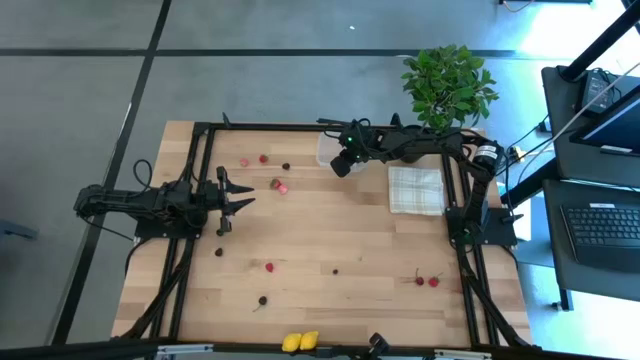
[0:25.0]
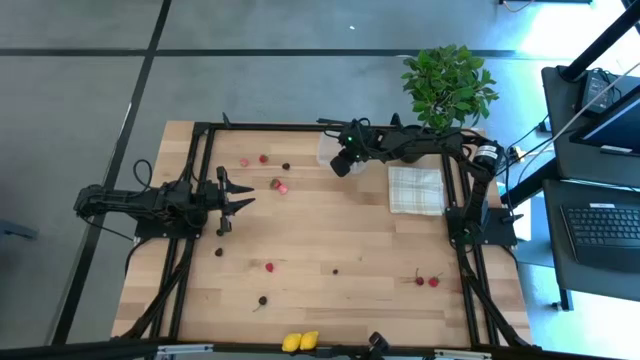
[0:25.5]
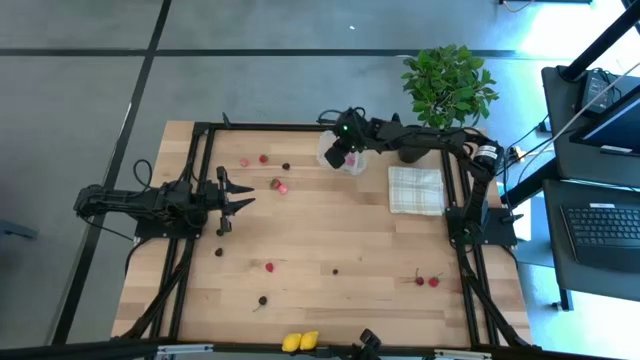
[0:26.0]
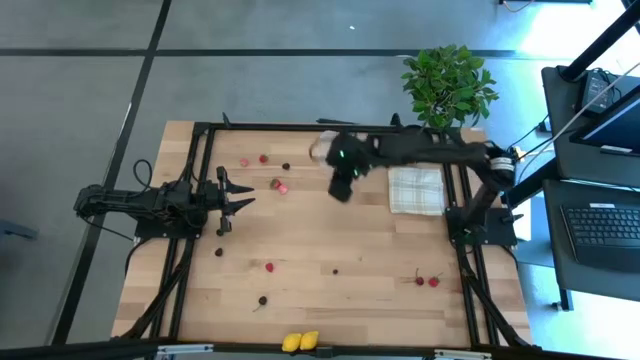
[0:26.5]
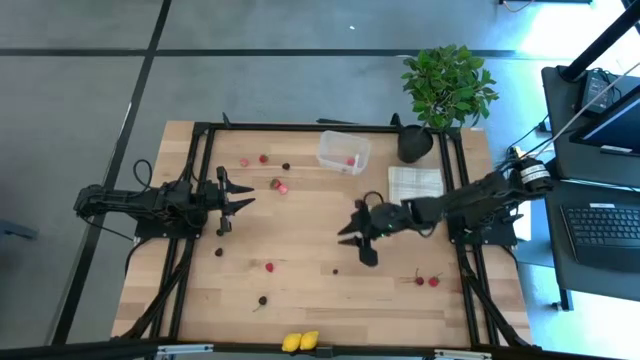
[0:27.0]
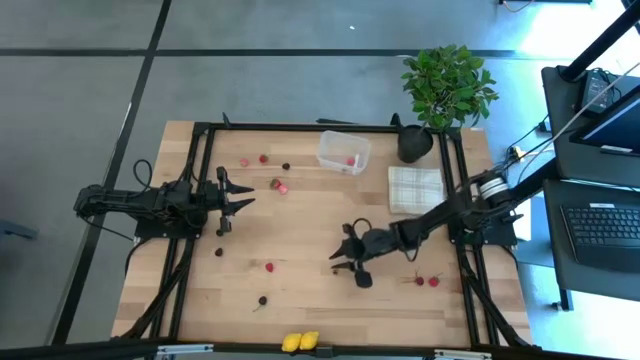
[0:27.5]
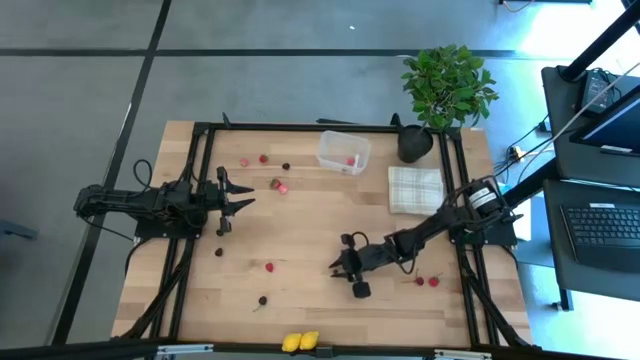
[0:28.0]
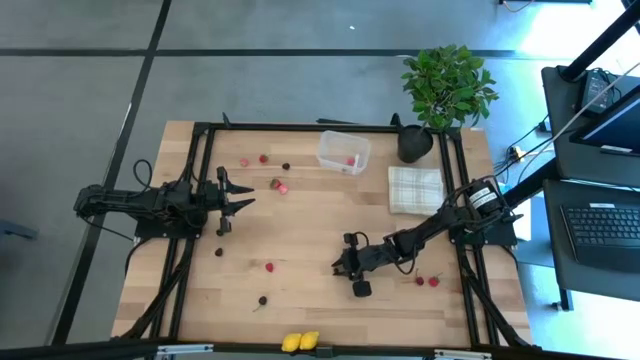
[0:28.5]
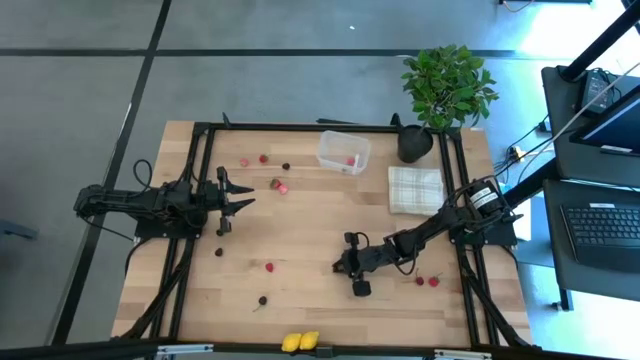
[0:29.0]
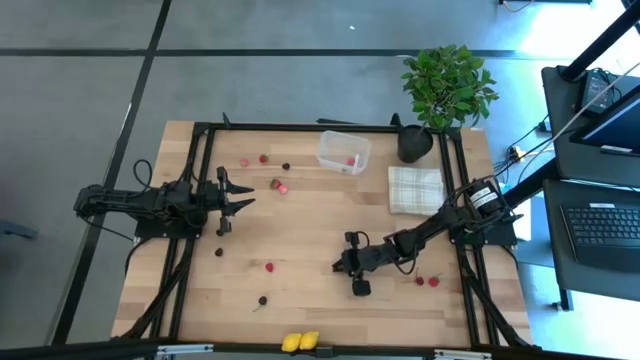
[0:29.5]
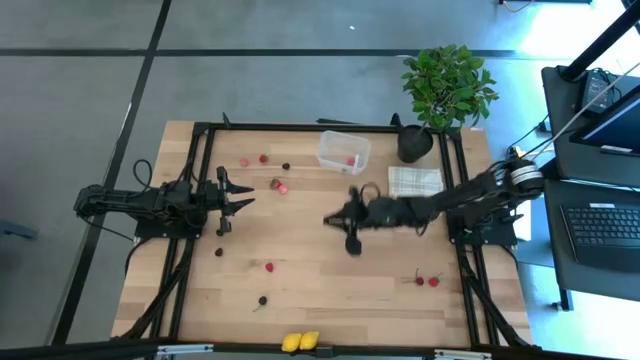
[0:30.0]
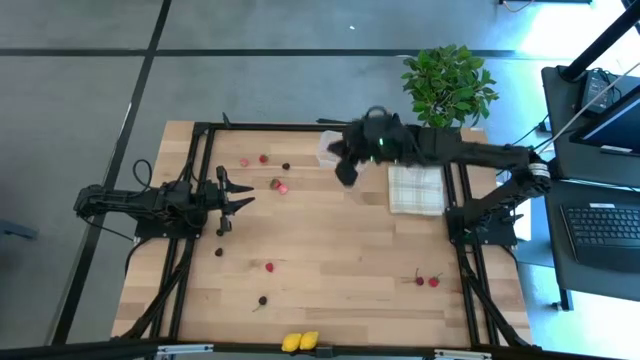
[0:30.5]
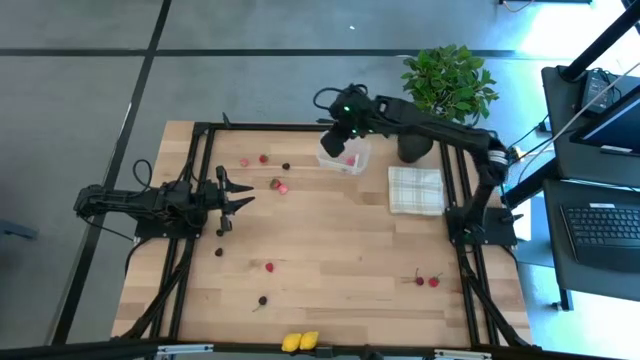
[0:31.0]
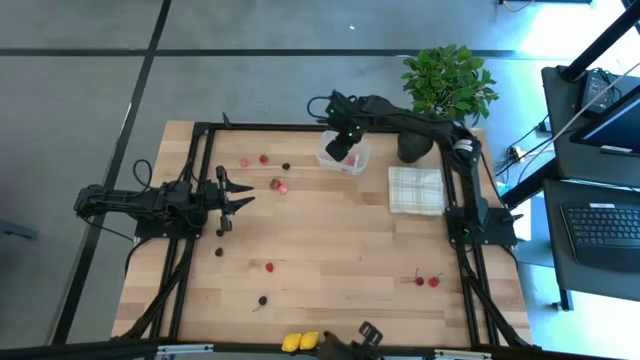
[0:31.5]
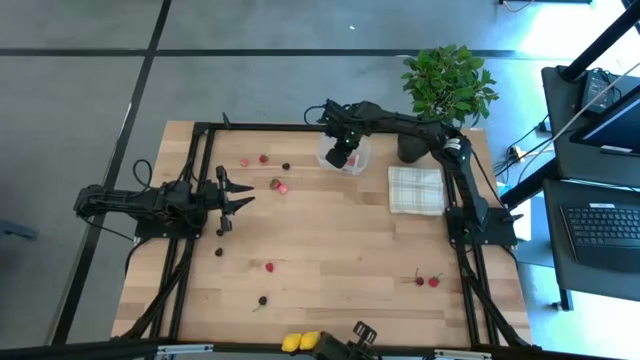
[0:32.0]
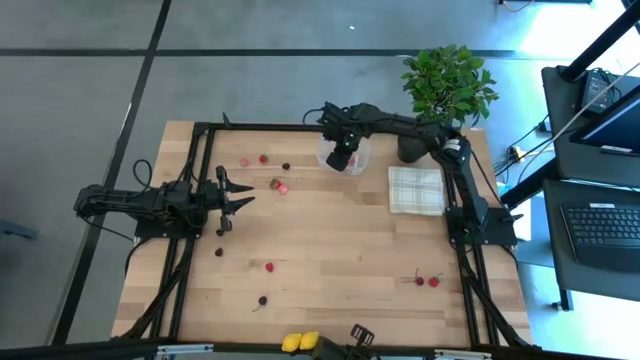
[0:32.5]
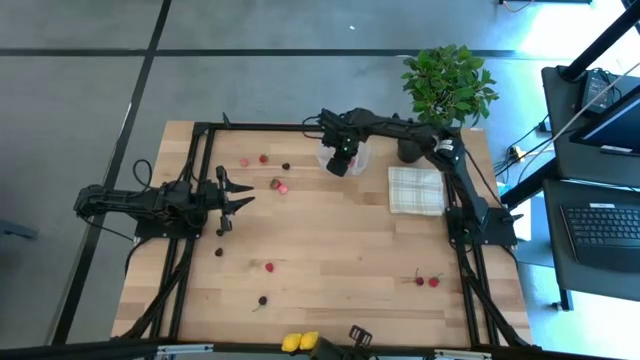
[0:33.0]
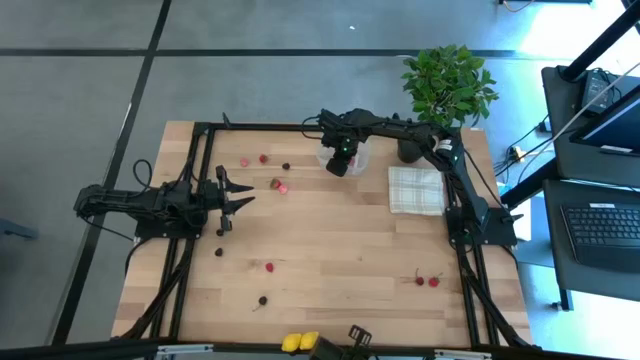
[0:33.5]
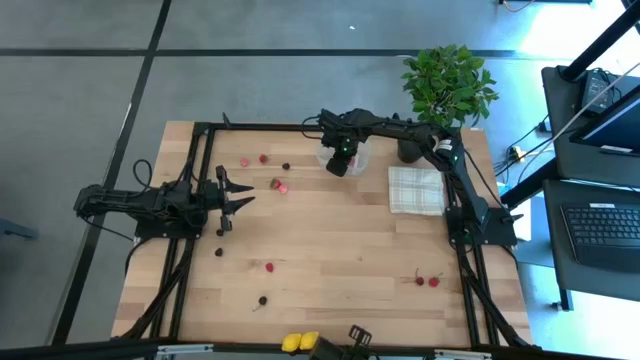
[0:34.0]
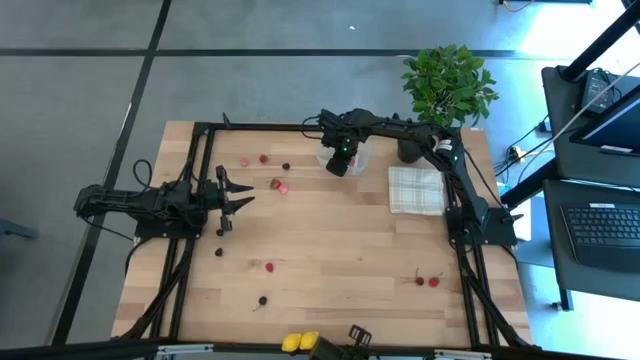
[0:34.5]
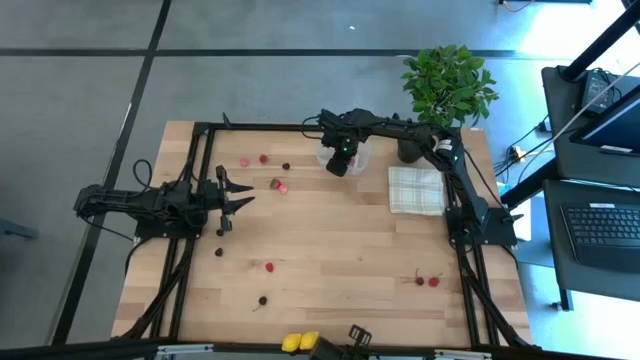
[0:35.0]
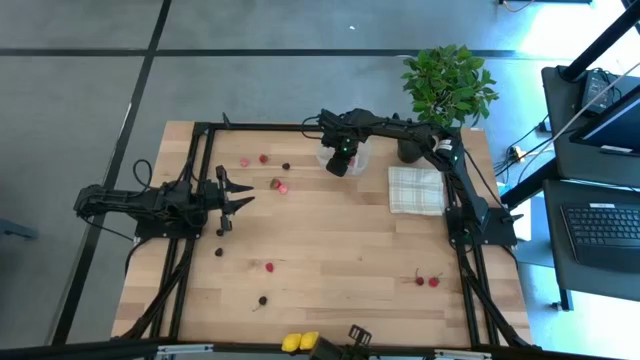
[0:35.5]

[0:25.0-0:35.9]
Task: Pick and placing Produce into tupperware
Put the blueberry into the transparent container

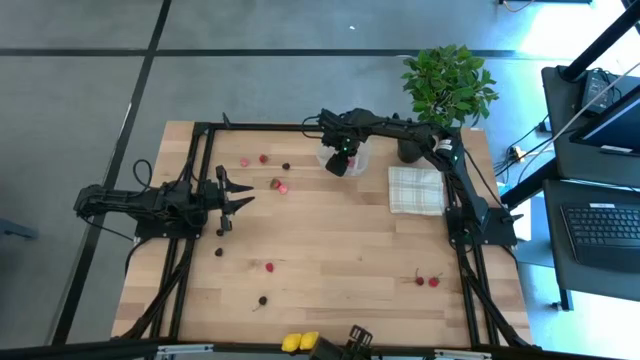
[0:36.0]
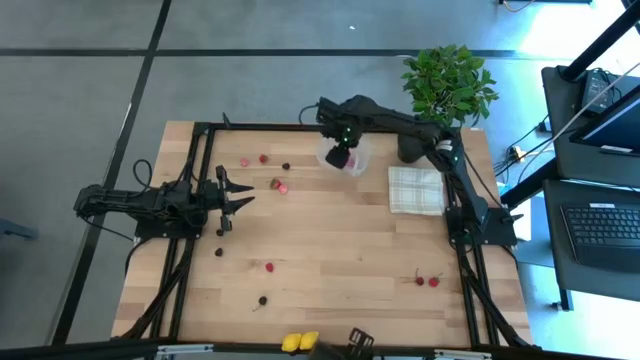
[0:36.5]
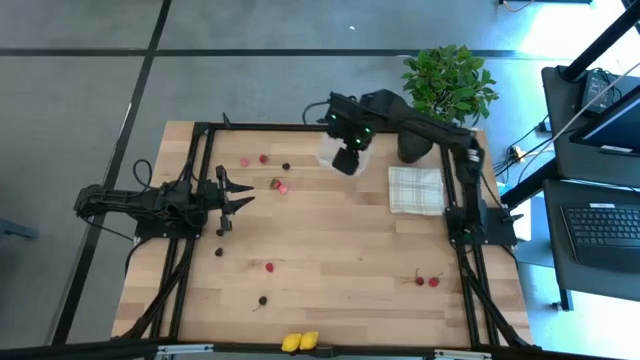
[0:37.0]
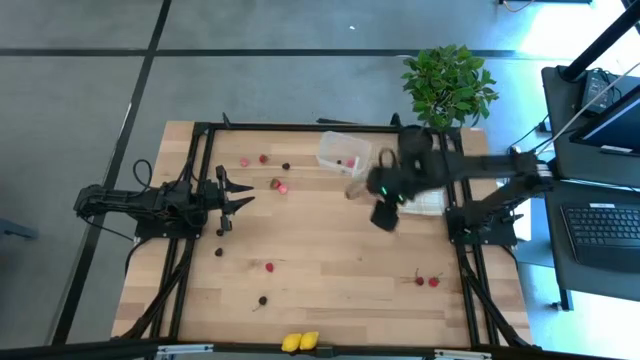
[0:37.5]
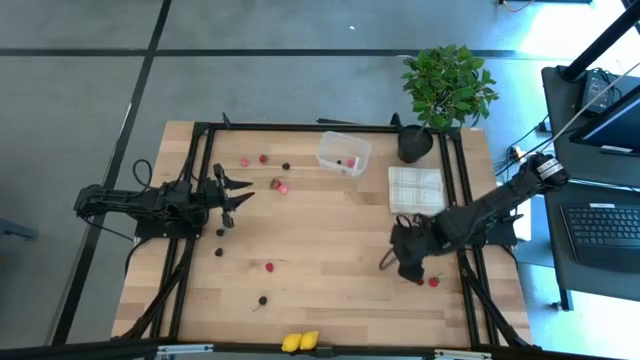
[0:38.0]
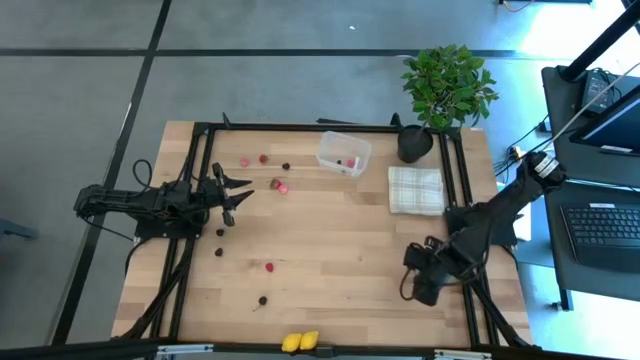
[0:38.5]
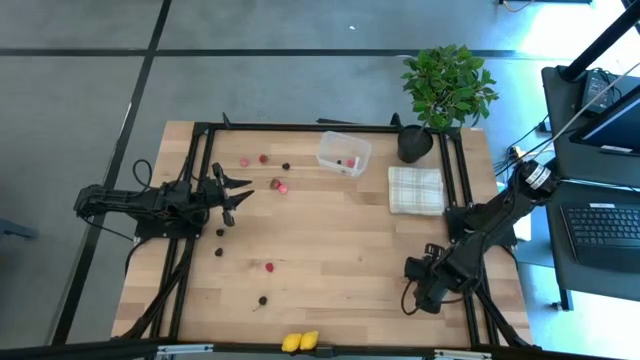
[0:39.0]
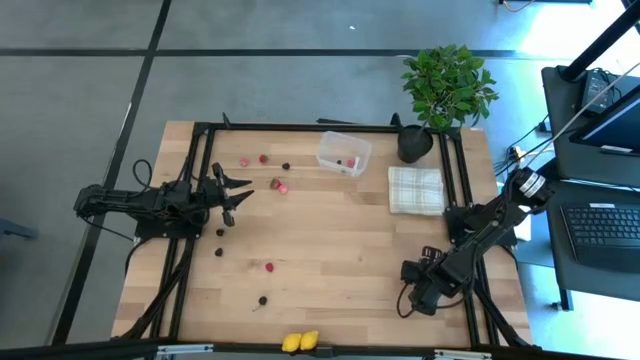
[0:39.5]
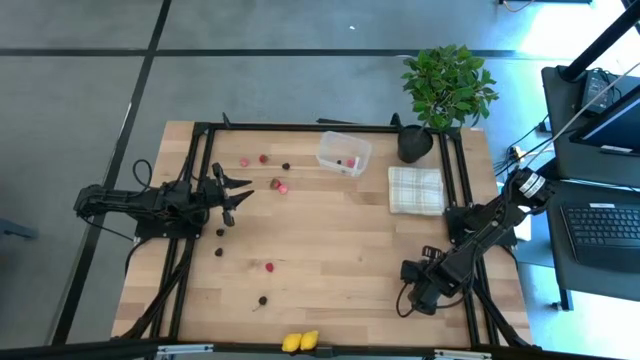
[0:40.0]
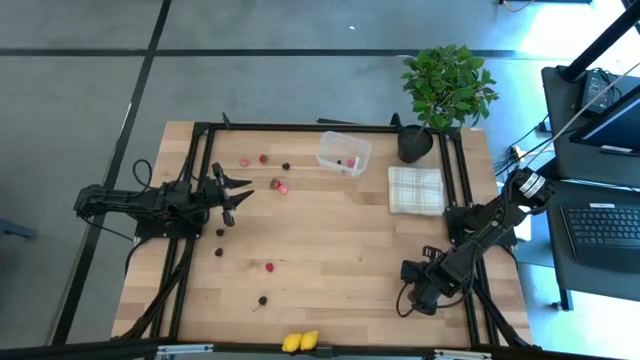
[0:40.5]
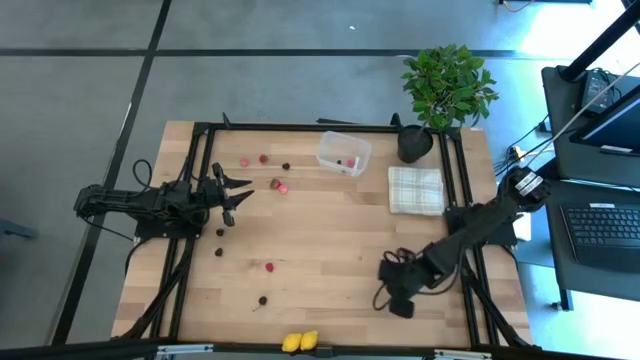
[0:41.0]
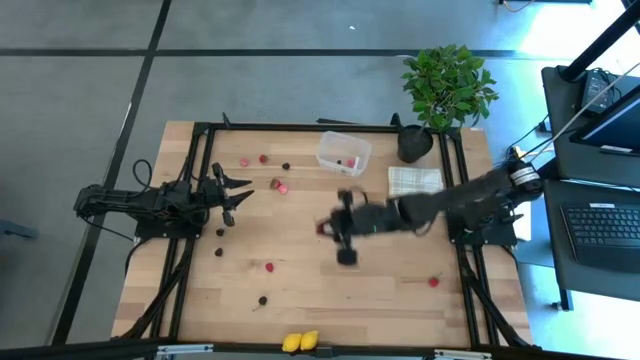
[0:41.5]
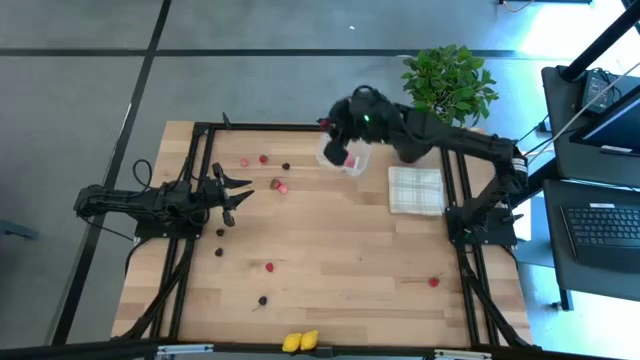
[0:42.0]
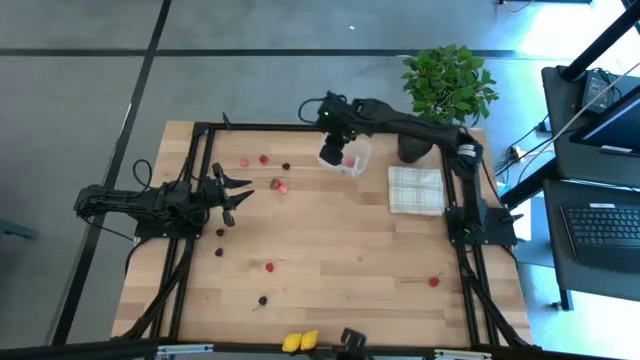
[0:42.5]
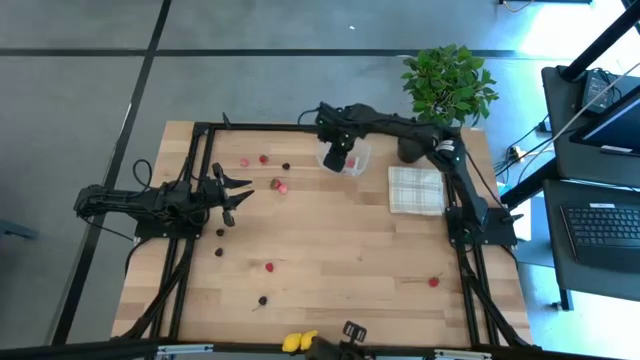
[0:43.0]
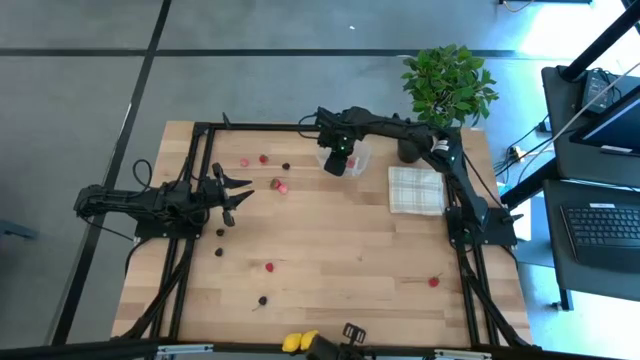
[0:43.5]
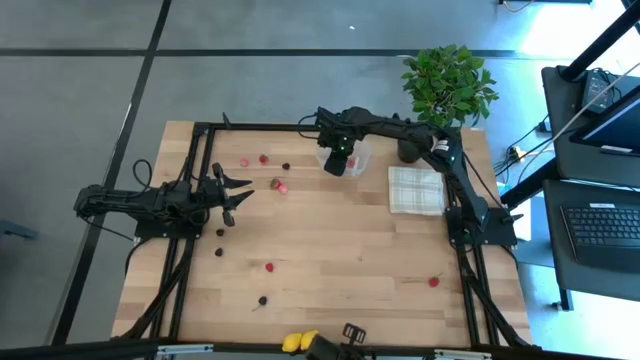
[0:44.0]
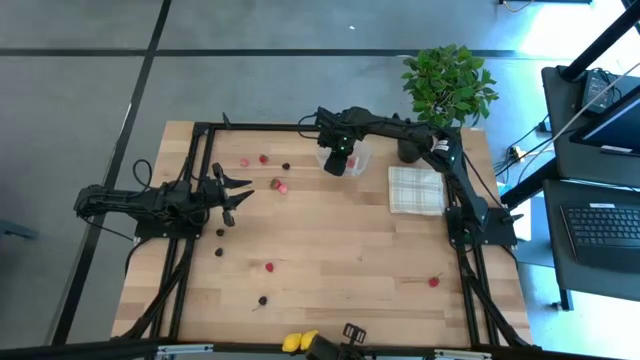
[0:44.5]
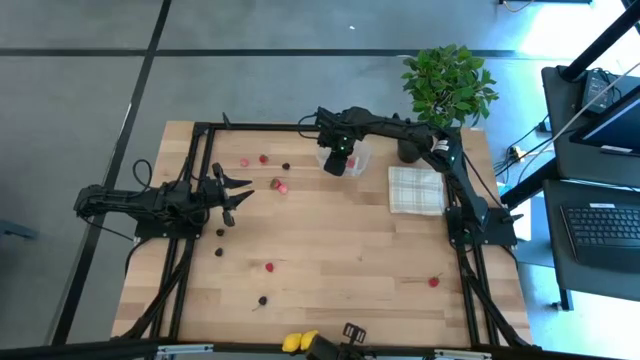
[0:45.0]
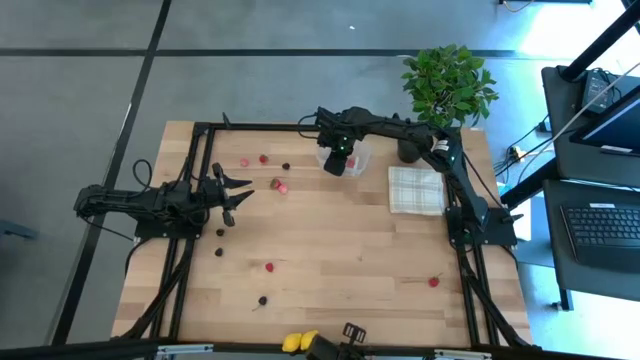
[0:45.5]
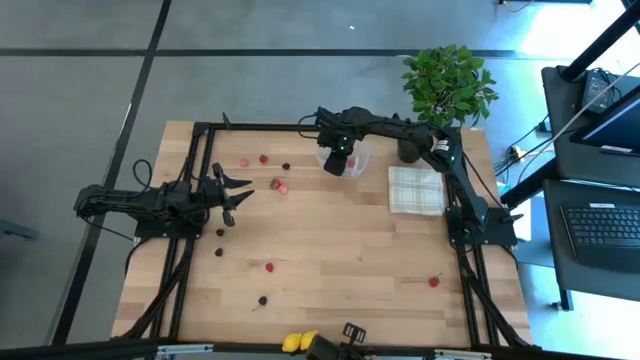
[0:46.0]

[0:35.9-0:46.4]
Put the red cherry into the transparent container
